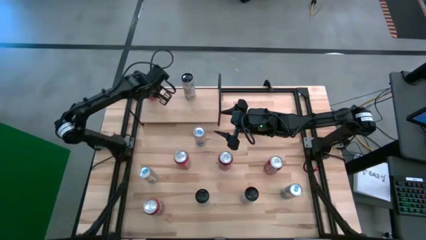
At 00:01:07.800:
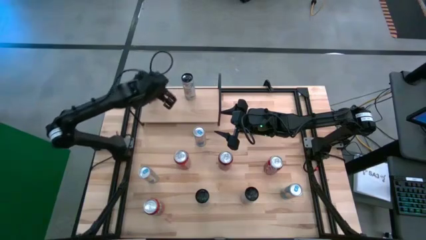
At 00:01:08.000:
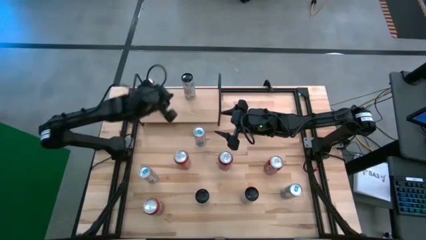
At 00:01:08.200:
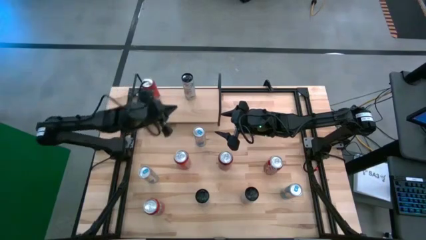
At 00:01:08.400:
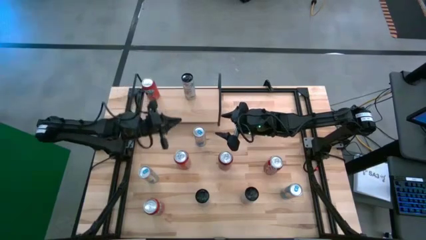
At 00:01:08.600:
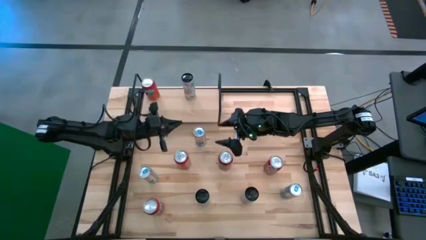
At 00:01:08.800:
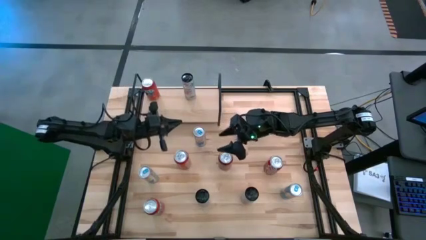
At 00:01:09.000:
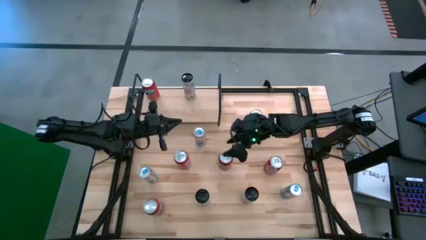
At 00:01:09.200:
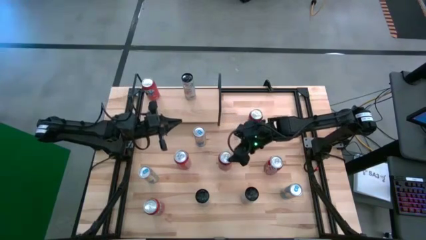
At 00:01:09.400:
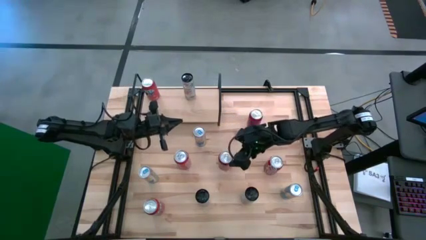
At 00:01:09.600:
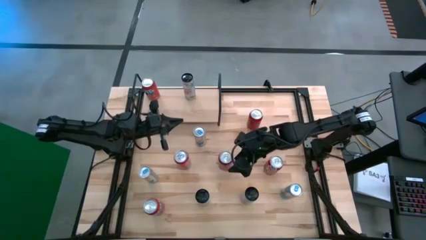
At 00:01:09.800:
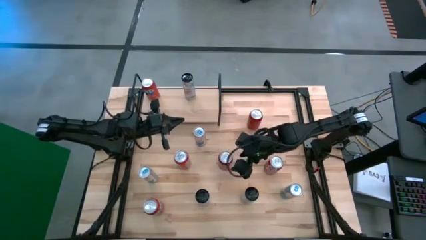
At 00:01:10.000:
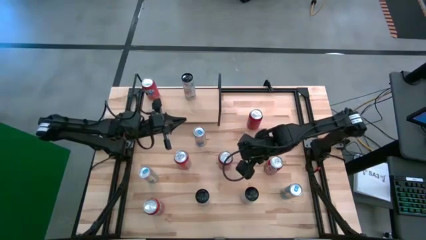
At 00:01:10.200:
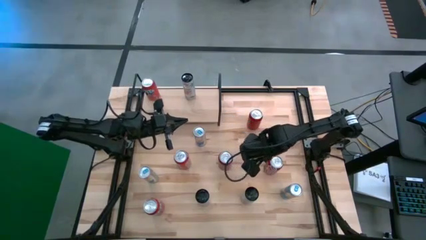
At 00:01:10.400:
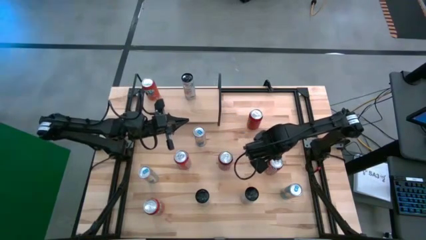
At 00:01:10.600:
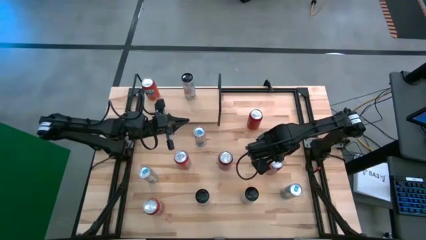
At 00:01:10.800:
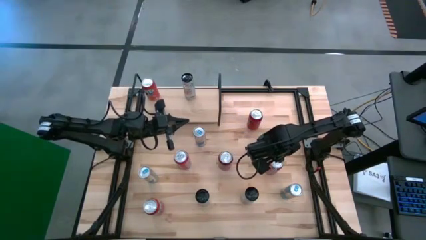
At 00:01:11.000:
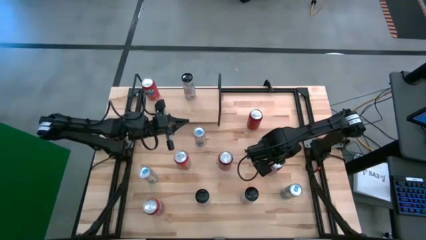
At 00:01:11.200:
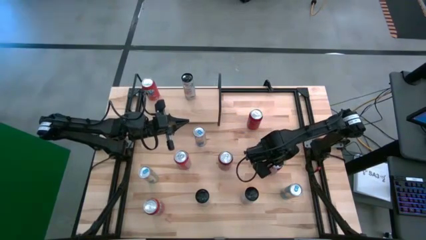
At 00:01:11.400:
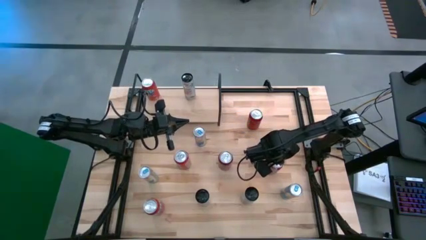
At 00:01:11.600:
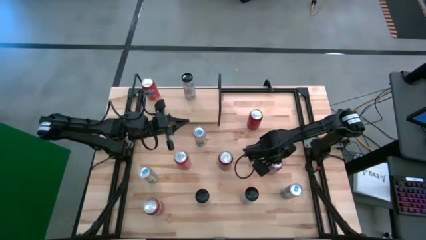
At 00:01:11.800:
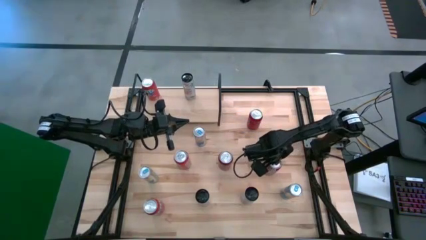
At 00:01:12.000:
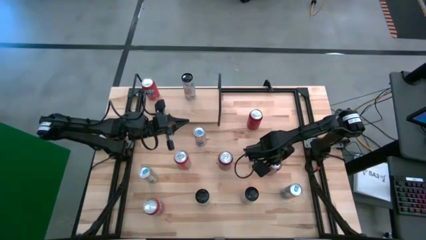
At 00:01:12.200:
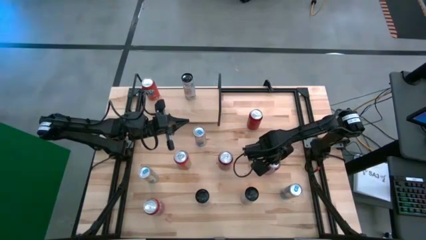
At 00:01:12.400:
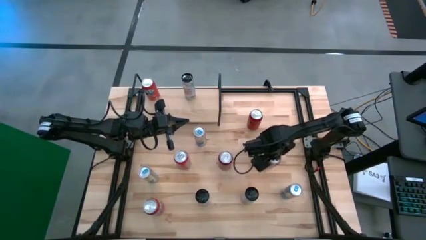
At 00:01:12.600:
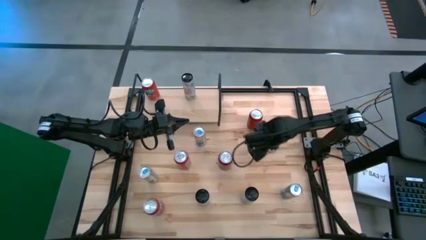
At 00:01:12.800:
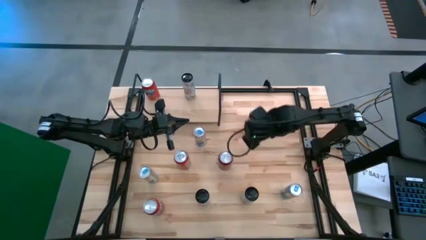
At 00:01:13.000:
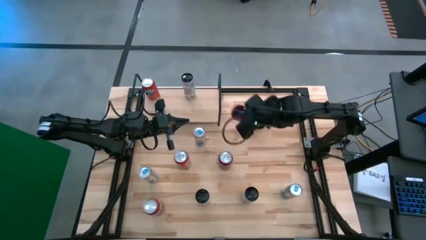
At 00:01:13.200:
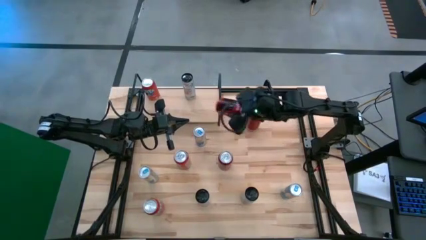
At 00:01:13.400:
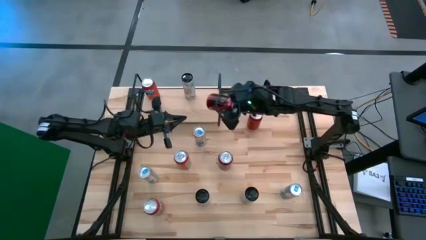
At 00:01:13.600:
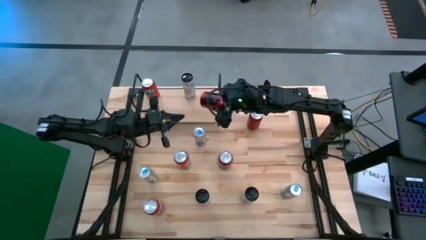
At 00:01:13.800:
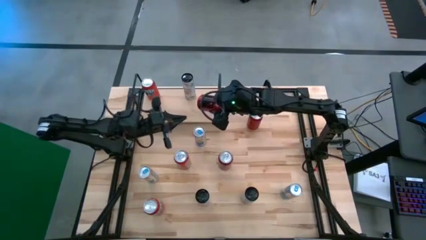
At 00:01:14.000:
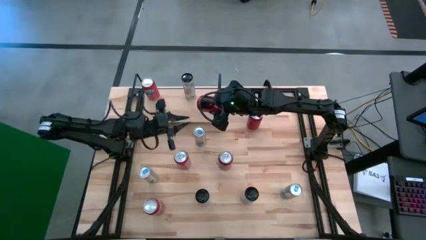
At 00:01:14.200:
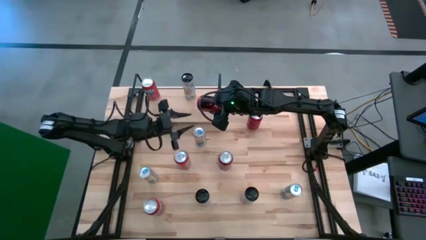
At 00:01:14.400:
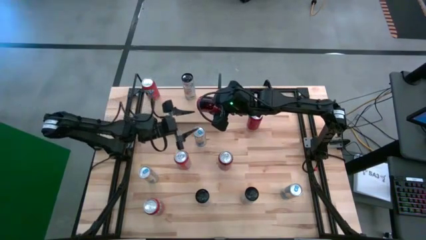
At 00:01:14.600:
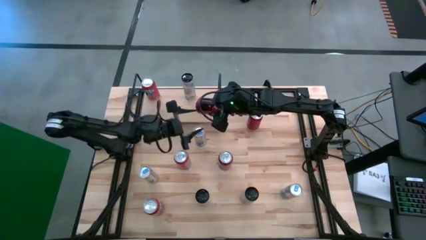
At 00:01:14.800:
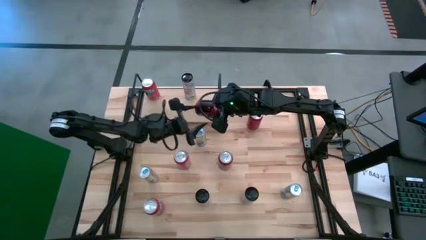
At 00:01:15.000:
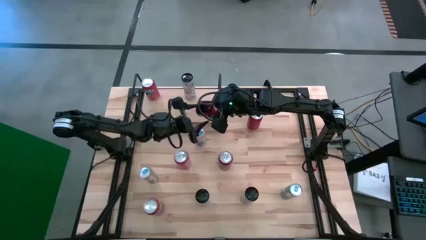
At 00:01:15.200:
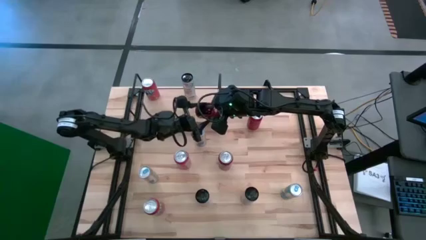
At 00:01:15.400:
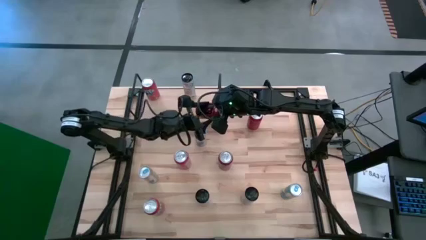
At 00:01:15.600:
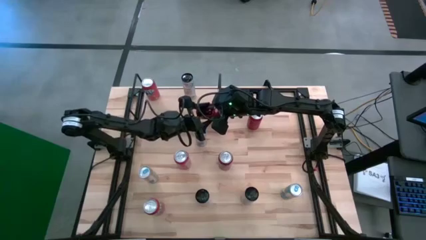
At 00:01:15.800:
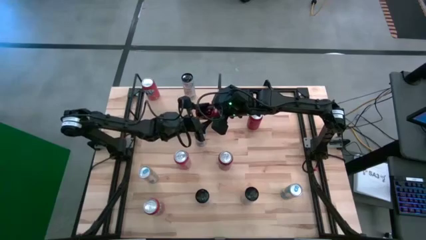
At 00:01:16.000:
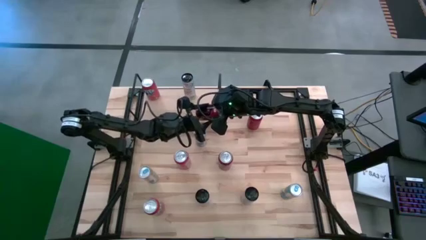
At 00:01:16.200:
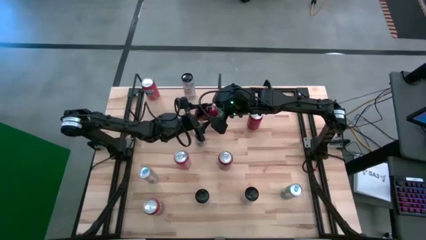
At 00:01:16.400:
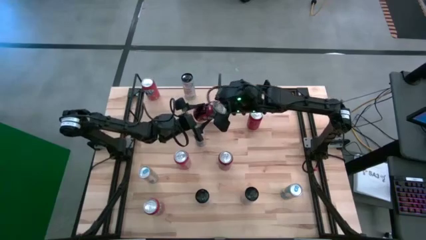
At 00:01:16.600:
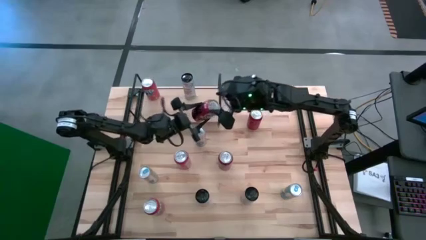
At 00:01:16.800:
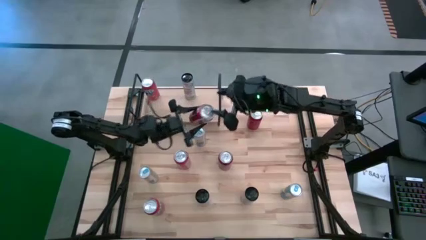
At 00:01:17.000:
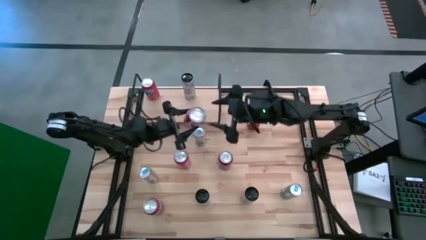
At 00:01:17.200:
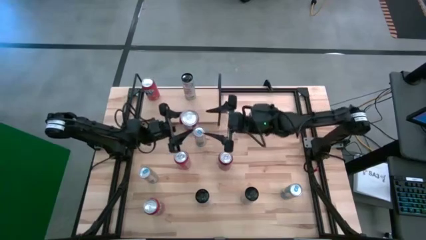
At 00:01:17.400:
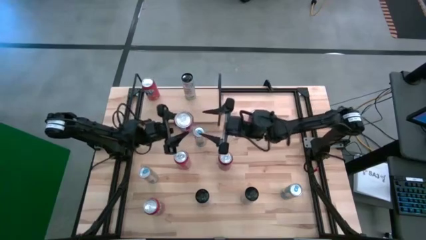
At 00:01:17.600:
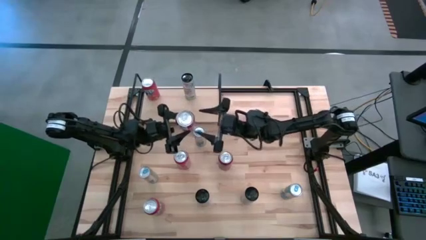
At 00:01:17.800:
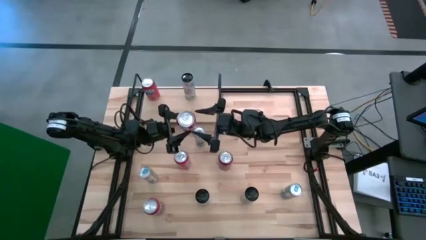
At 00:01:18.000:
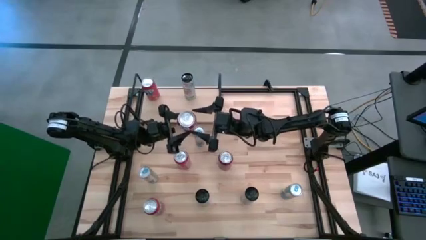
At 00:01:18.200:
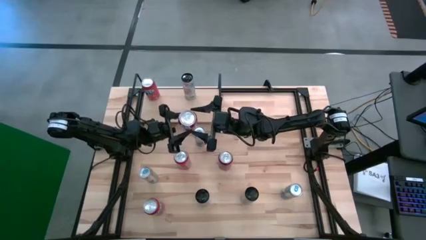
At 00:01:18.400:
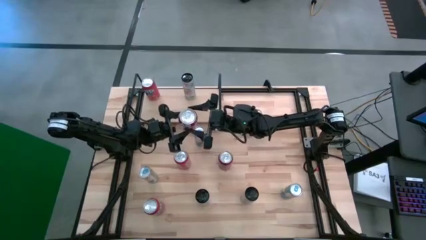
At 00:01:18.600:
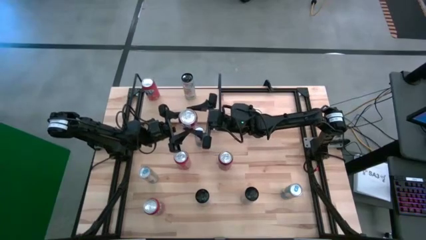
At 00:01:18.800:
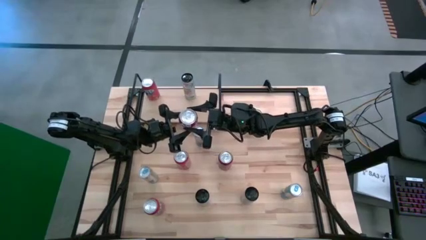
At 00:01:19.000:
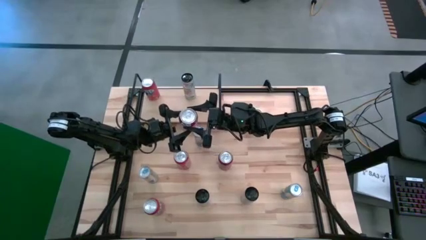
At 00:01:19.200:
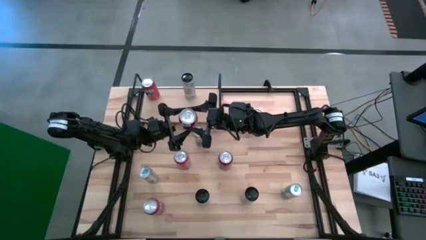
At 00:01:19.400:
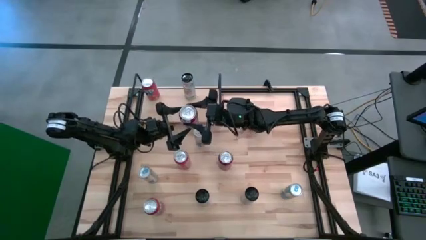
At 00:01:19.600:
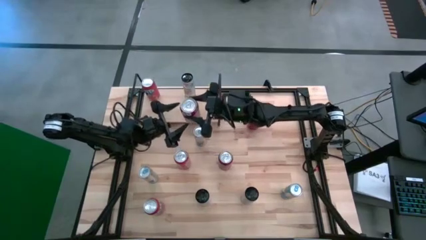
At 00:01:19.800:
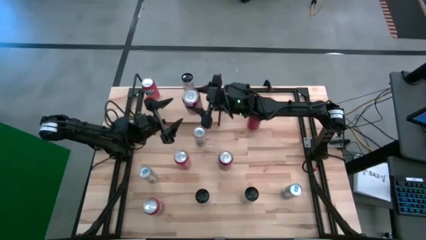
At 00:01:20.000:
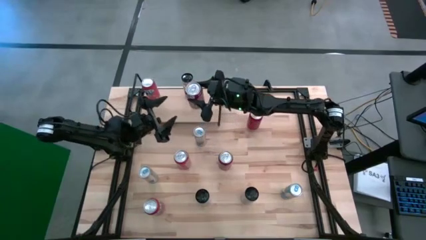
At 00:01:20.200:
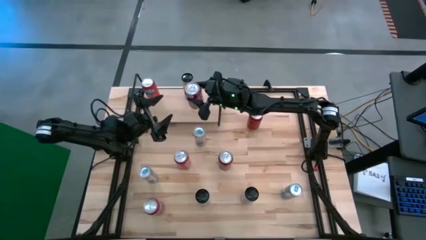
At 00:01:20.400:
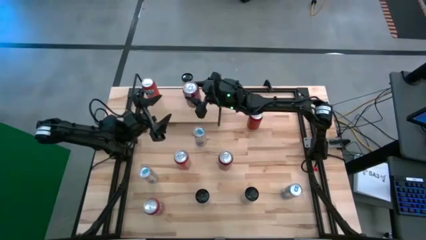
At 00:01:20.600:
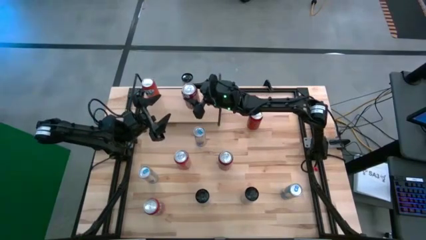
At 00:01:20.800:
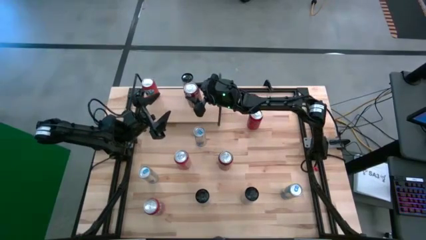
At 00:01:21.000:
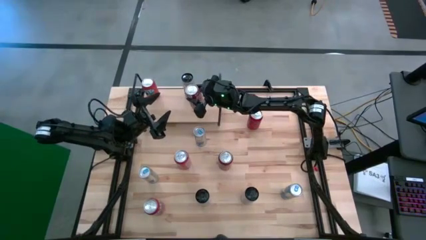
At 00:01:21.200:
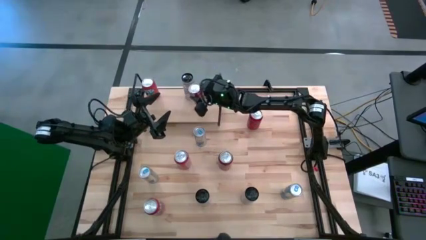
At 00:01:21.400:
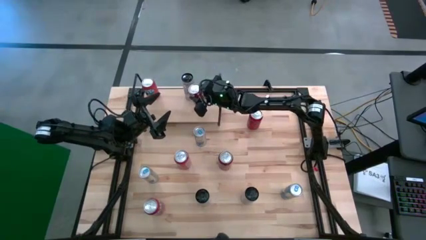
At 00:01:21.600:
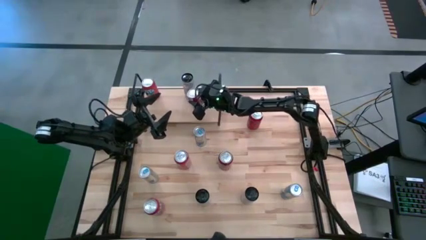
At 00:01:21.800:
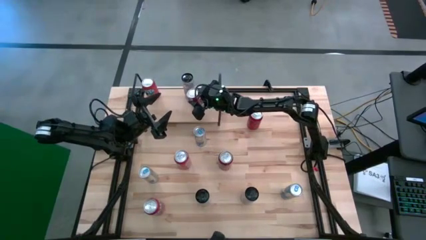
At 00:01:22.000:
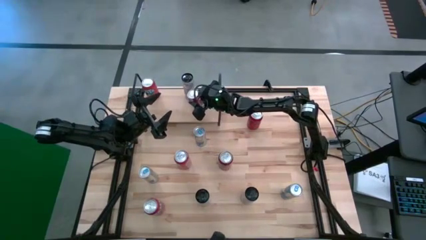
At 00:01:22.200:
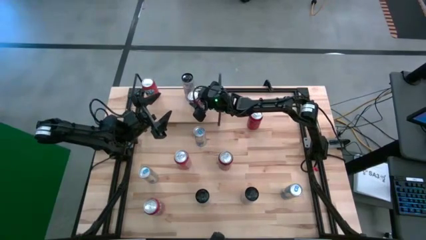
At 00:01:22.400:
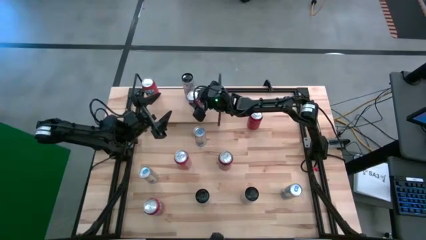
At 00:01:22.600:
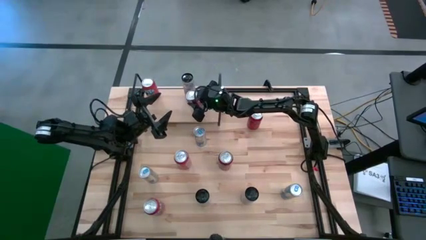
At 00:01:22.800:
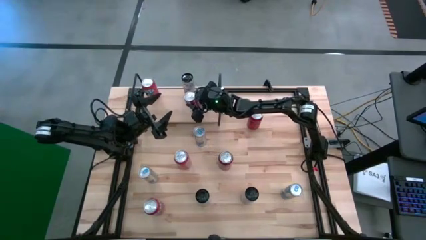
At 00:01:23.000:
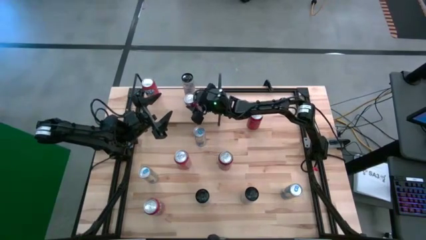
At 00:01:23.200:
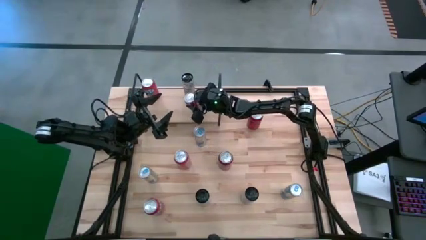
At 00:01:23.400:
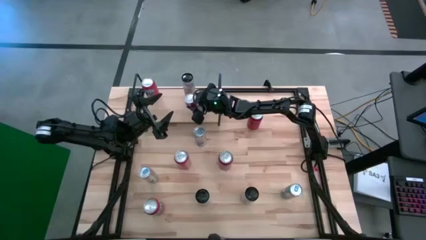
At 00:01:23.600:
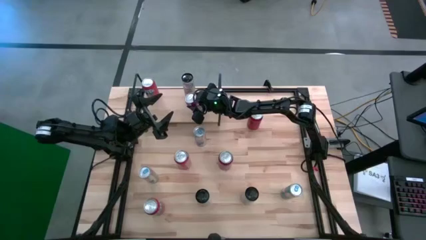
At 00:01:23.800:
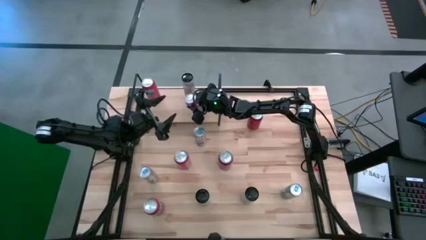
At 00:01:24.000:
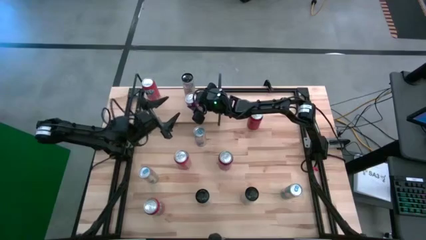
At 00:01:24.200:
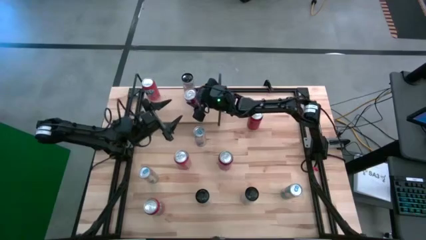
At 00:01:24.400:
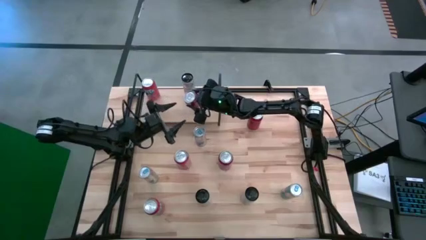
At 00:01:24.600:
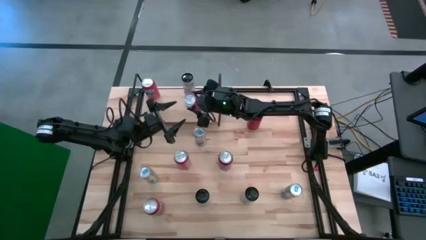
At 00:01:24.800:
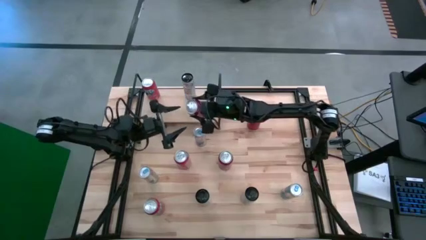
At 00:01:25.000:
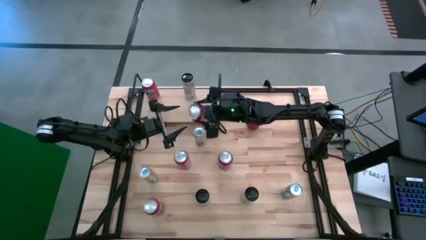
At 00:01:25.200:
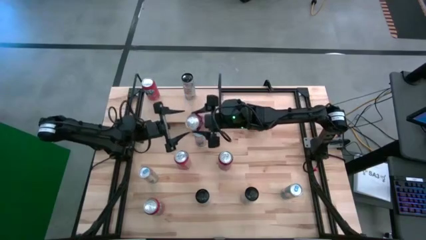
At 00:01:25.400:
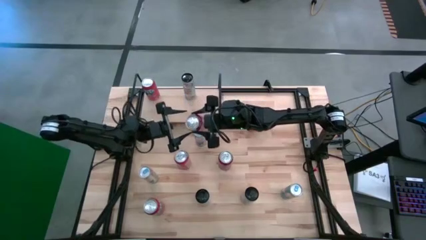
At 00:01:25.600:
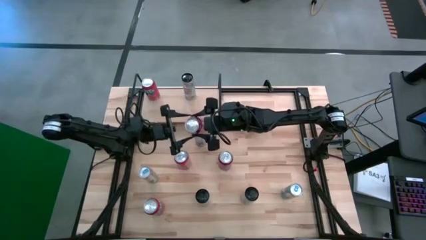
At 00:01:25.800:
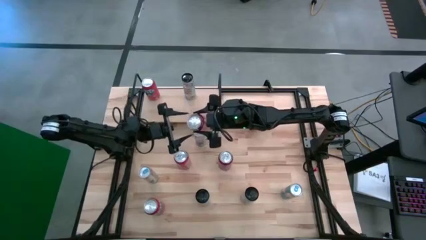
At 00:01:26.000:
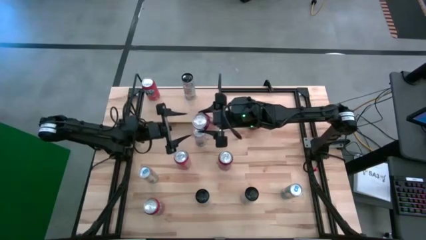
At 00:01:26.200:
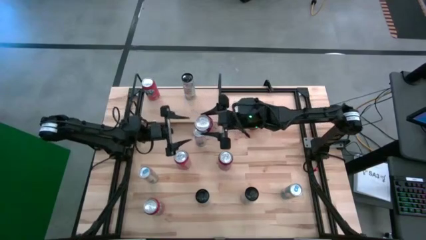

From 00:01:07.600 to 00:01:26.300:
Task: Place canned beverage on shelf
Put the red white soda can on the shelf
